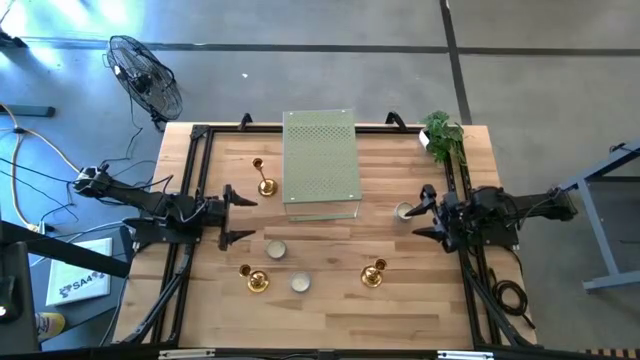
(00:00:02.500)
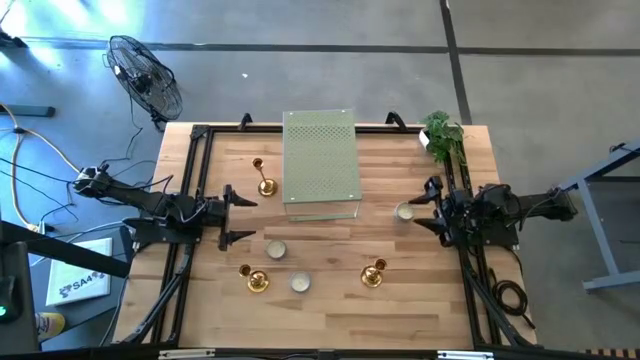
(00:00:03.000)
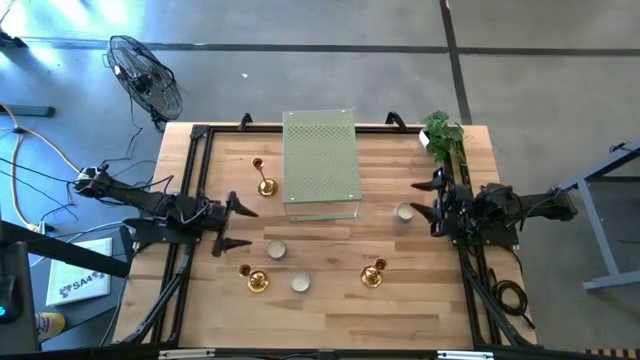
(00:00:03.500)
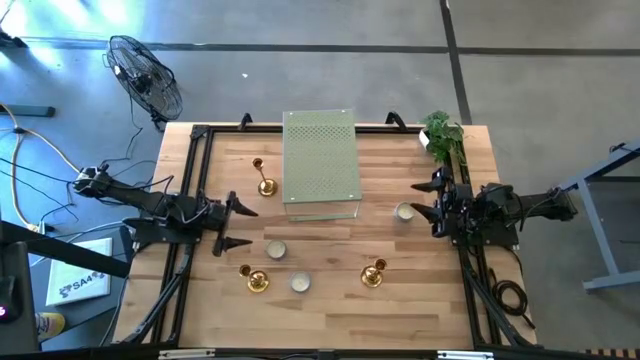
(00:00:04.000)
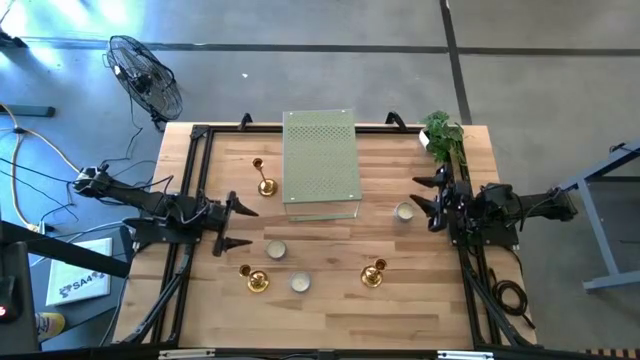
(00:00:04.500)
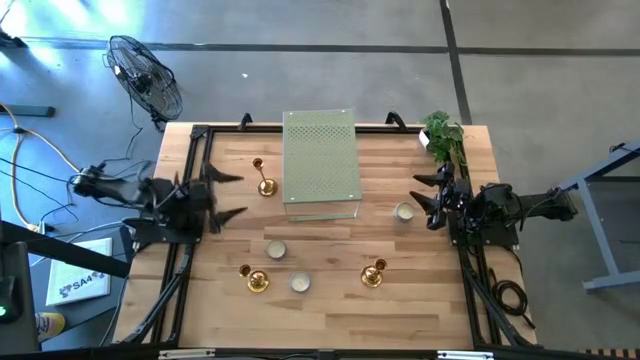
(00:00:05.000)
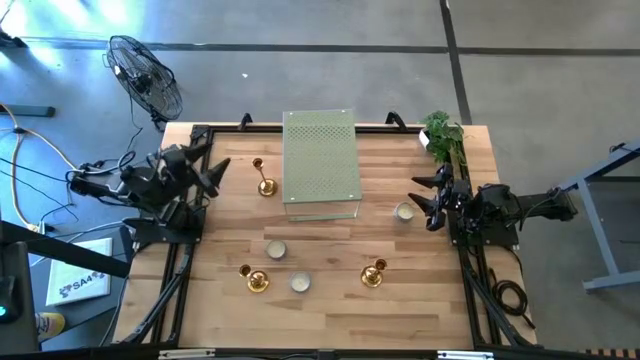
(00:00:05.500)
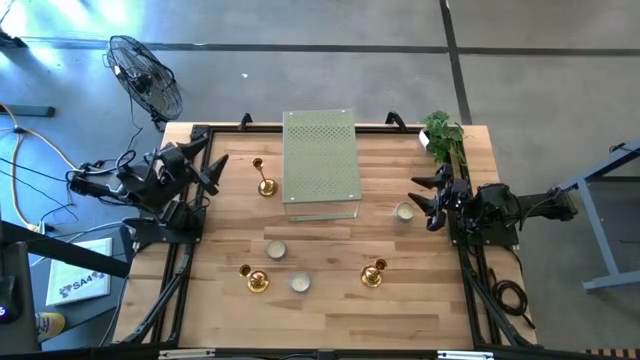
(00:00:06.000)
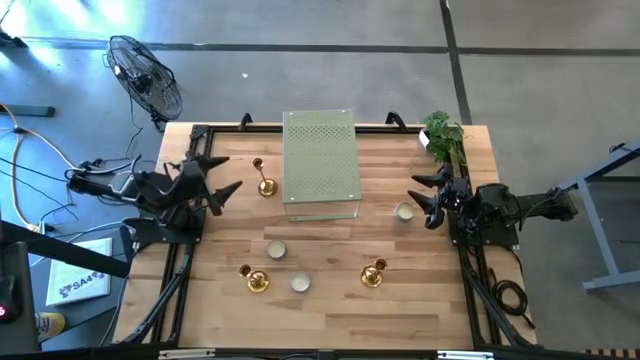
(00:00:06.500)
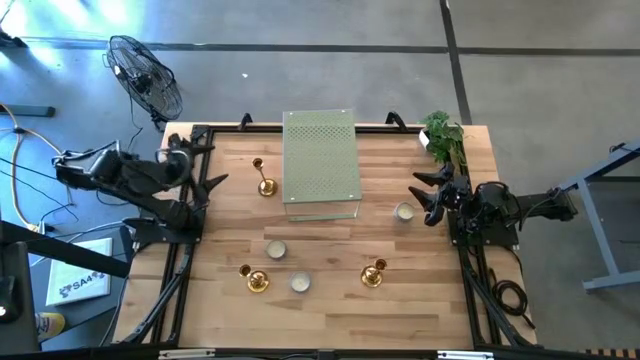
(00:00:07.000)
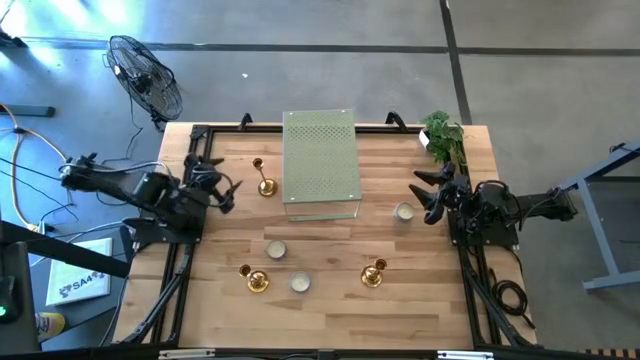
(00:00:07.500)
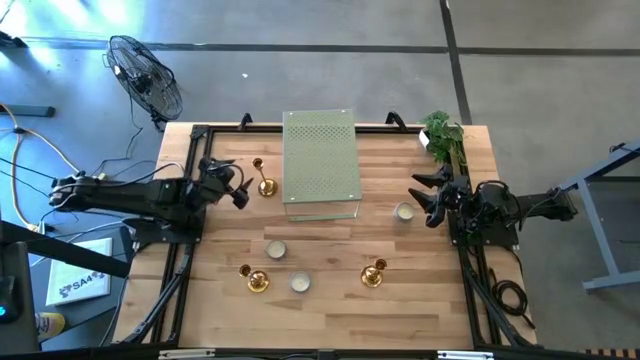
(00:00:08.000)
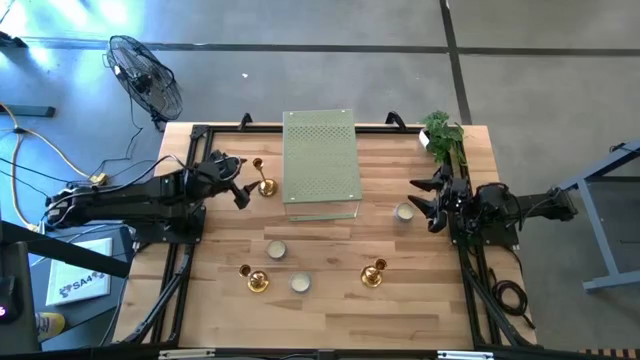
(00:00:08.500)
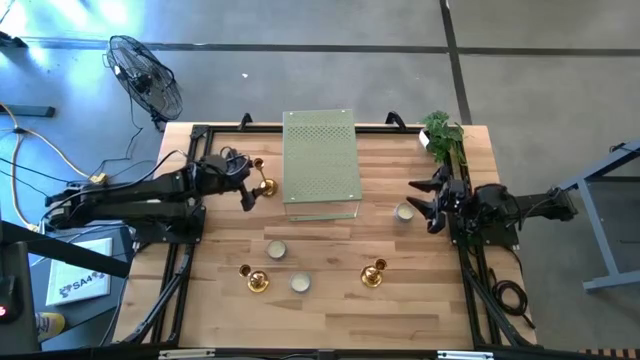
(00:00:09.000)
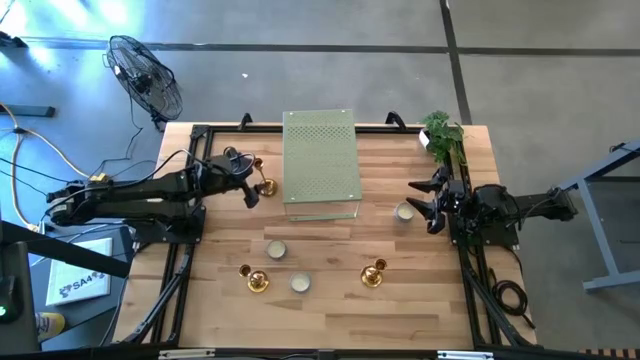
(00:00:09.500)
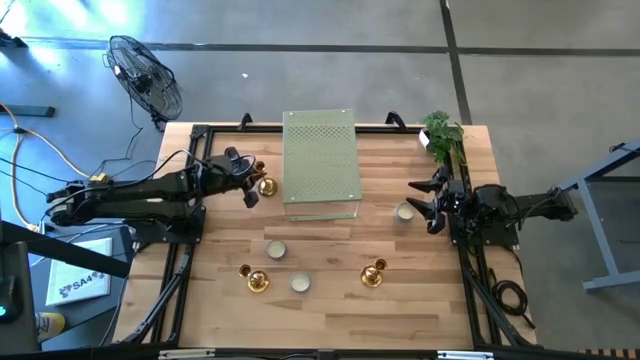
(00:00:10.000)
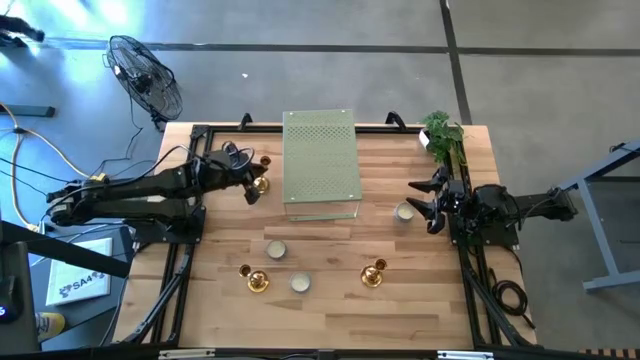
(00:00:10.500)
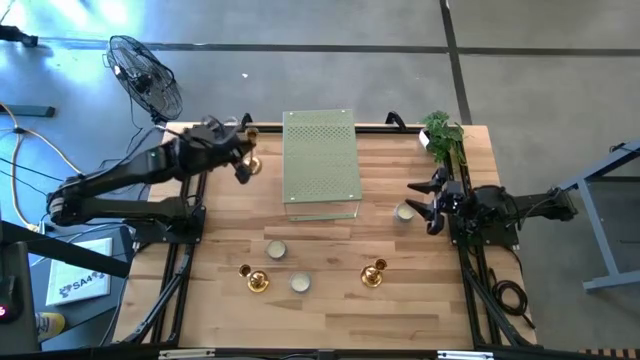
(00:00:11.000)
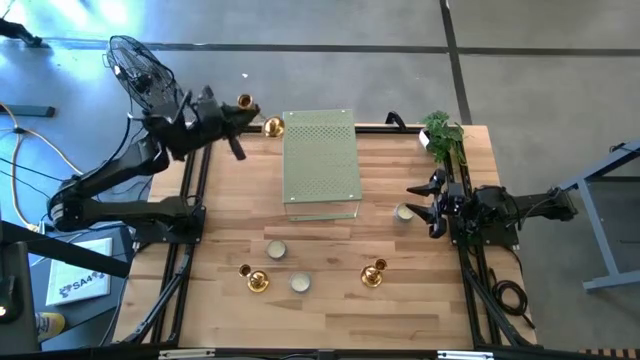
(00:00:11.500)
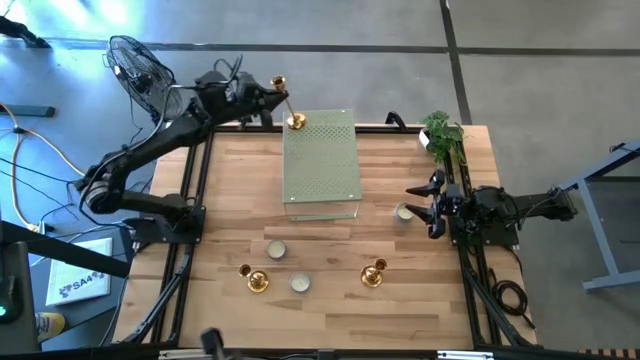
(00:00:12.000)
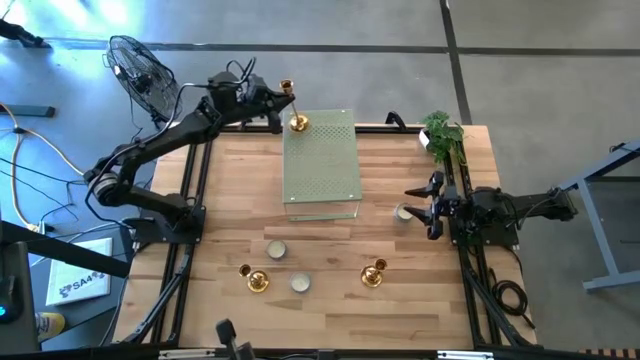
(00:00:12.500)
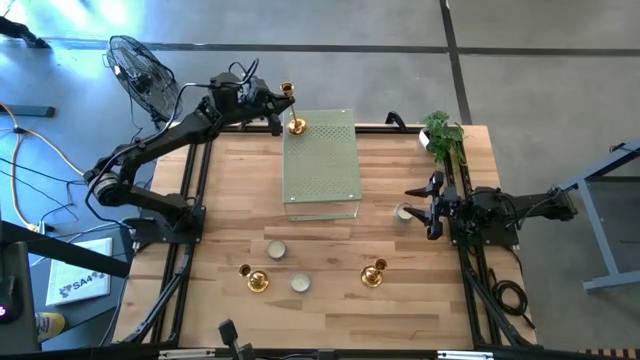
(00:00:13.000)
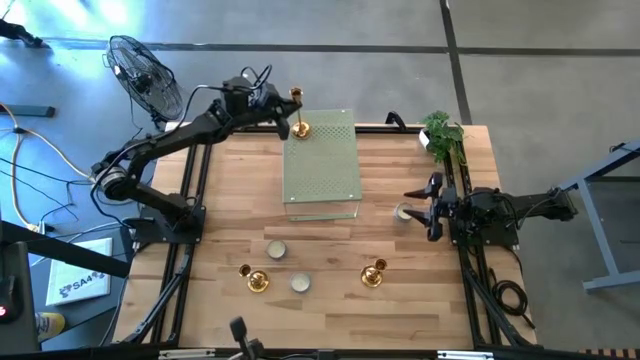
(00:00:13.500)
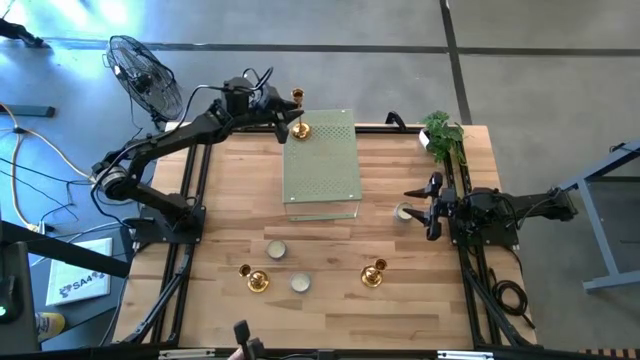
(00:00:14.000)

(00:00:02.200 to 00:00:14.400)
Task: Pick & Place candle stick holders
Put the top gold candle holder on the shelf

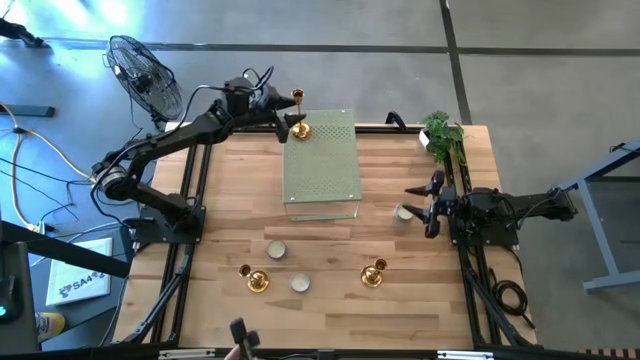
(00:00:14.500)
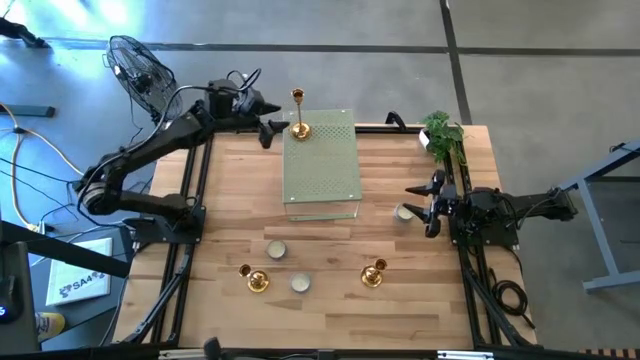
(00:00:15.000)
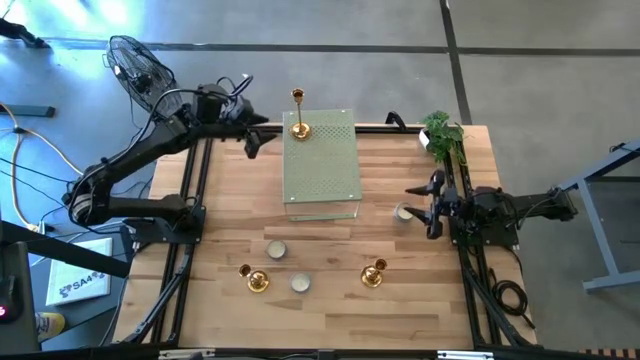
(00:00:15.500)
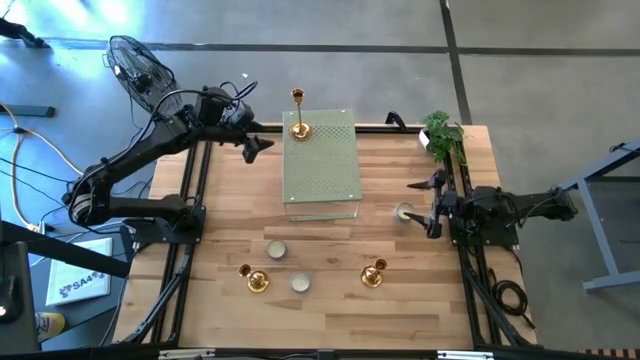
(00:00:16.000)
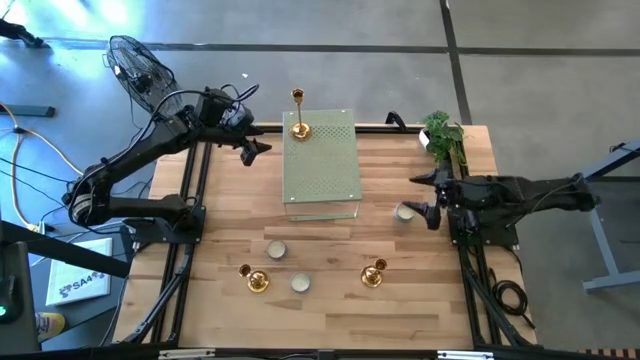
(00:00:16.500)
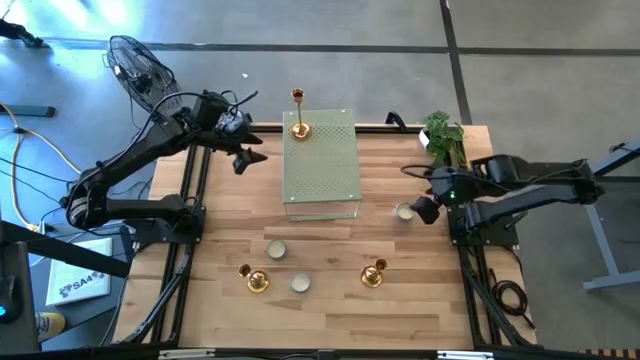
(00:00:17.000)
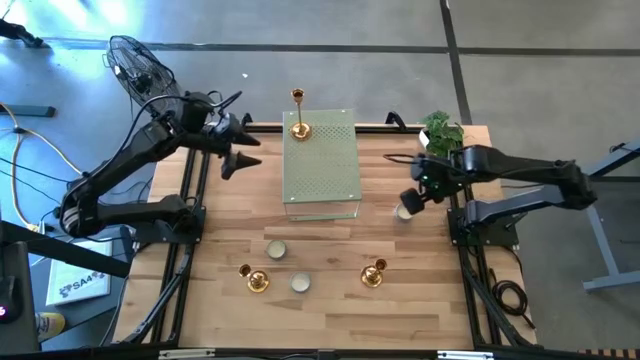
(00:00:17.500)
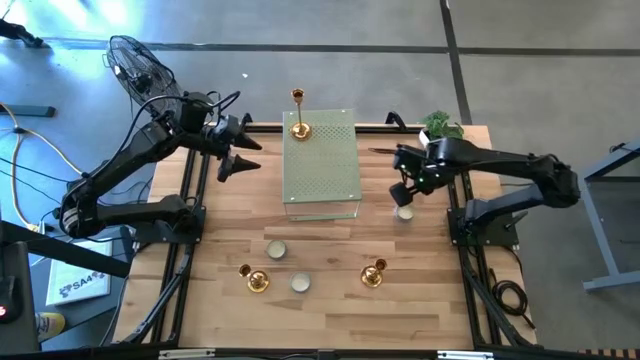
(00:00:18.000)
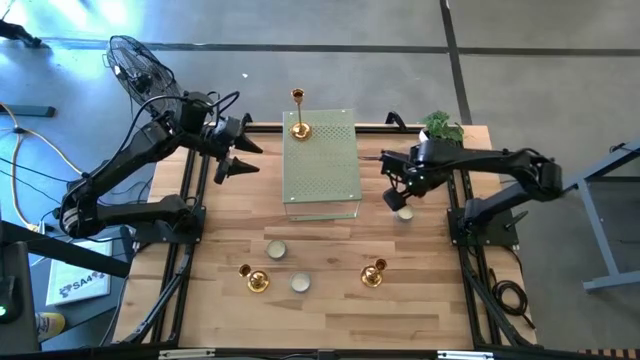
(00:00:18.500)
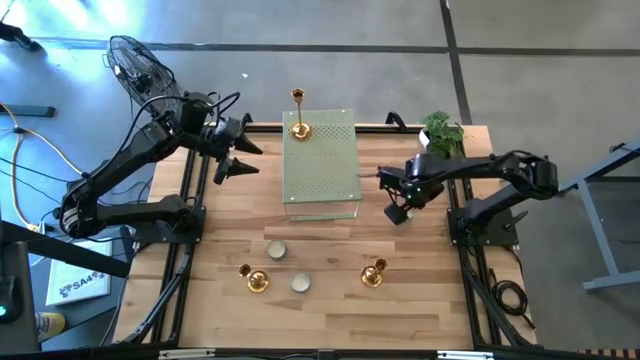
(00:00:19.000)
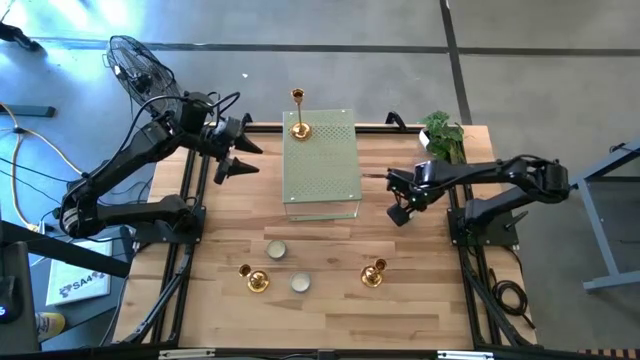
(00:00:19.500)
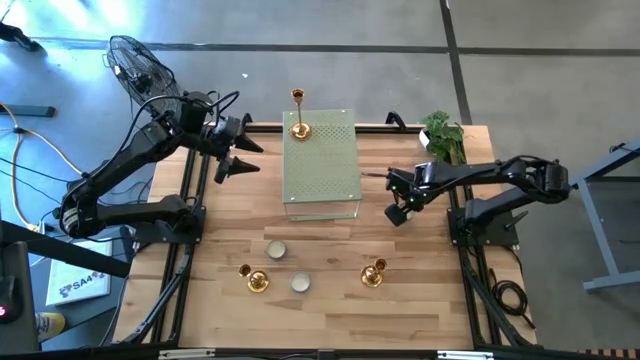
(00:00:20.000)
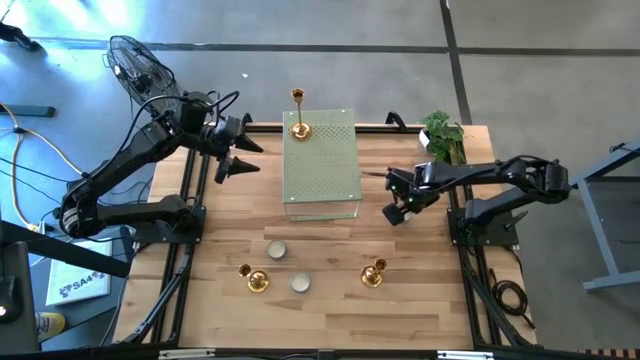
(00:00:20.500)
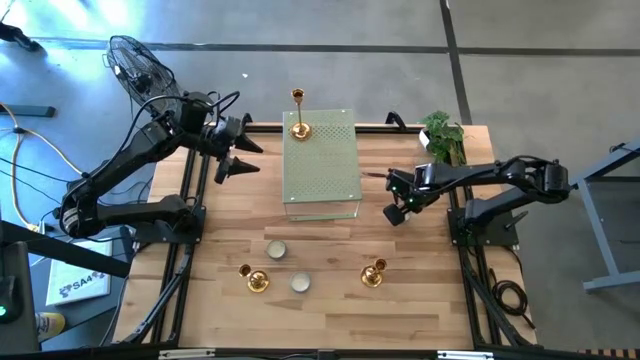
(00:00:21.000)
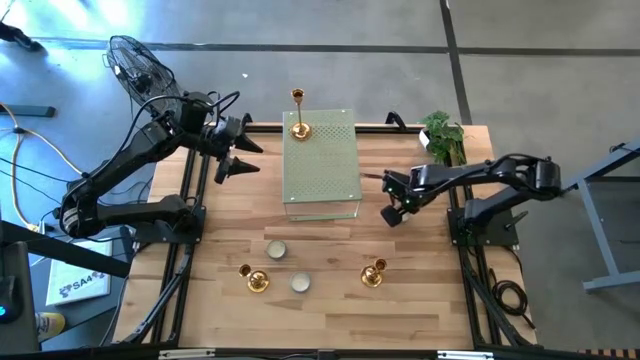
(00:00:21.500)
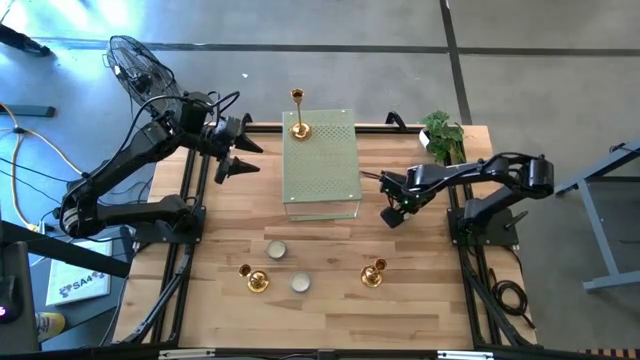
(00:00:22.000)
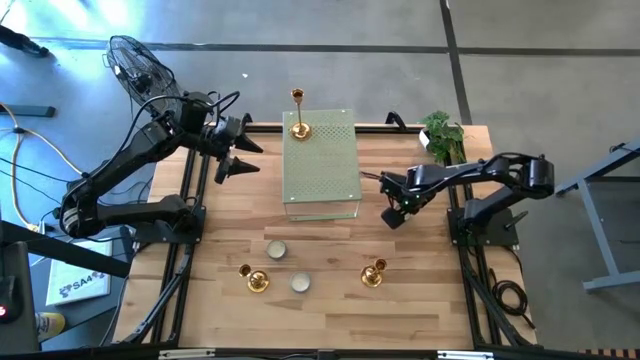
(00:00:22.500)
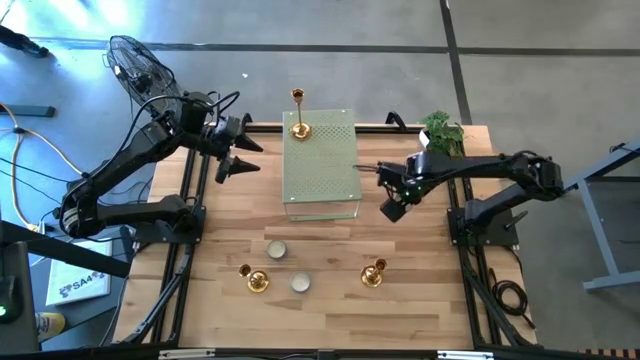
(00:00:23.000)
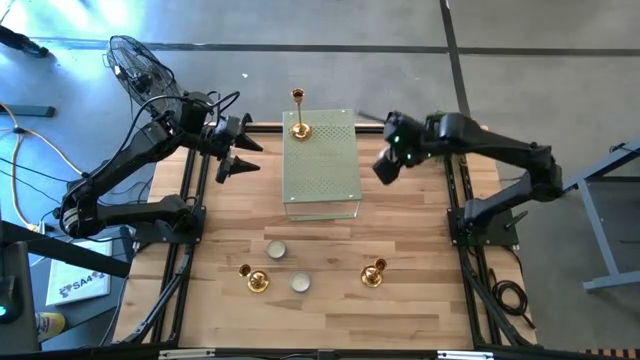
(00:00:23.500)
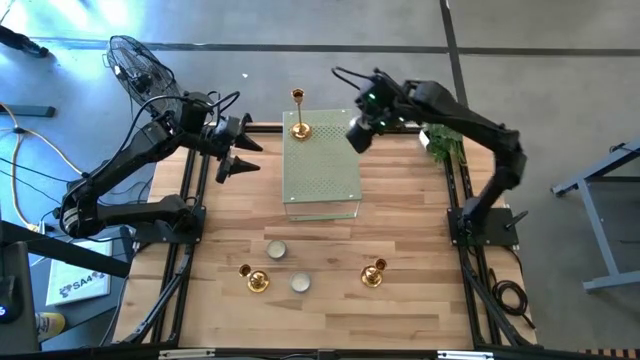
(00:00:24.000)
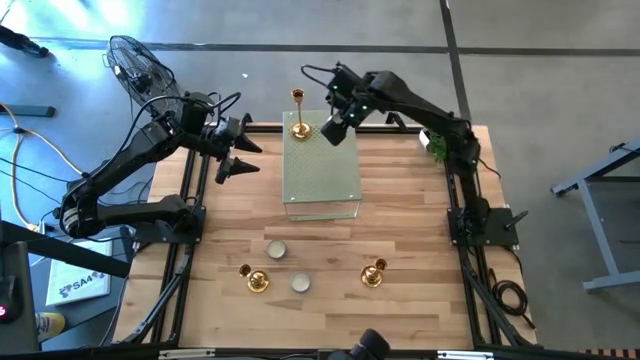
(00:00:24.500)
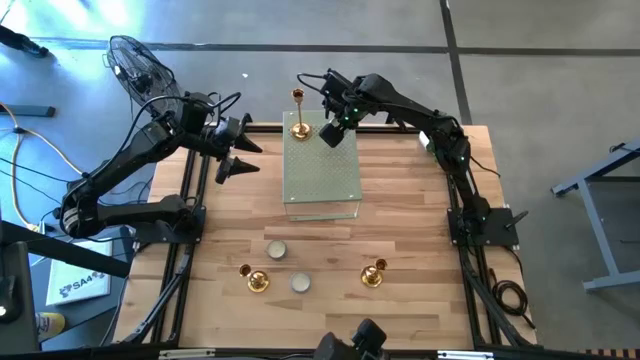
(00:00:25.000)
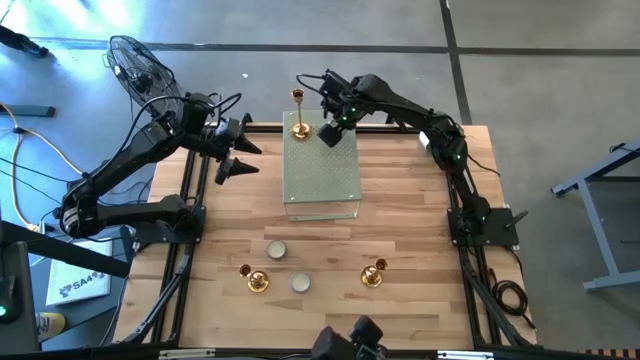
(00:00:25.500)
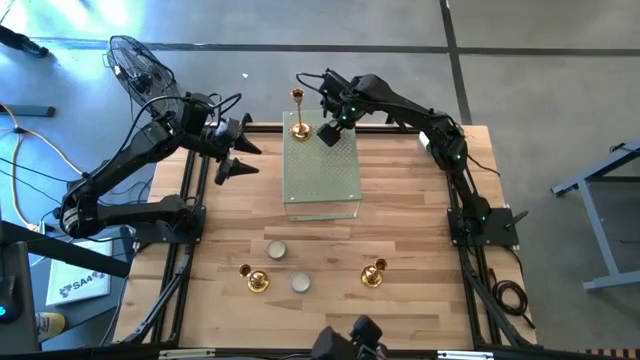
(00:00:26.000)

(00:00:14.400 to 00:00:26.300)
Put the top right blue scented candle to the right of the gold candle holder on the shelf
